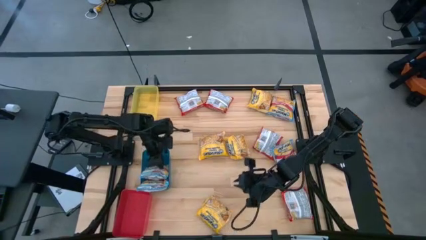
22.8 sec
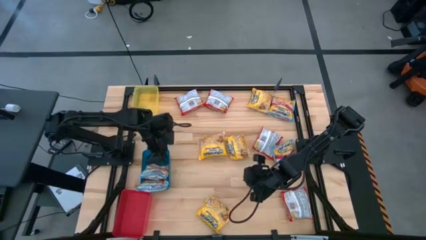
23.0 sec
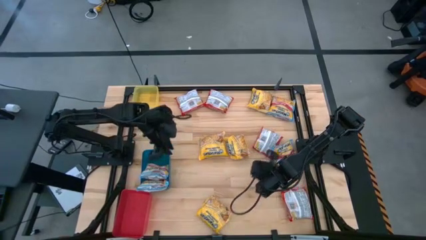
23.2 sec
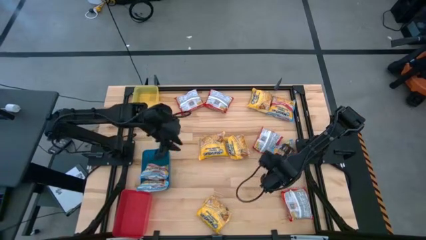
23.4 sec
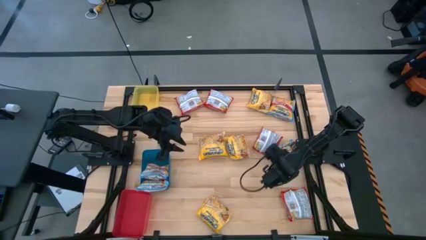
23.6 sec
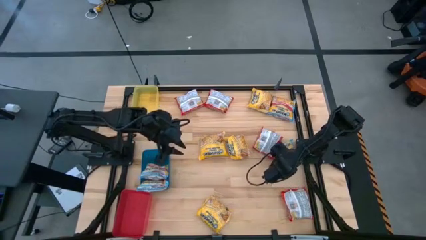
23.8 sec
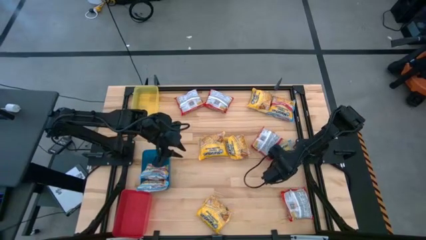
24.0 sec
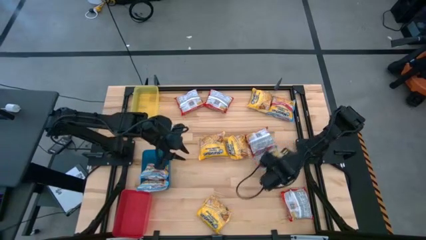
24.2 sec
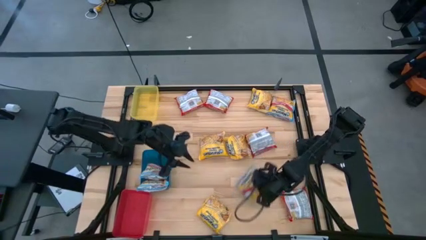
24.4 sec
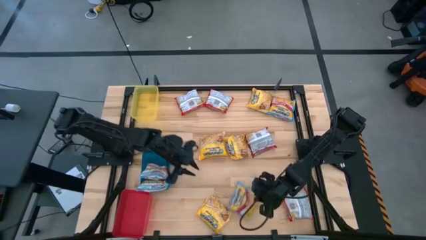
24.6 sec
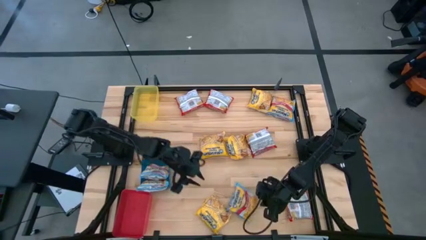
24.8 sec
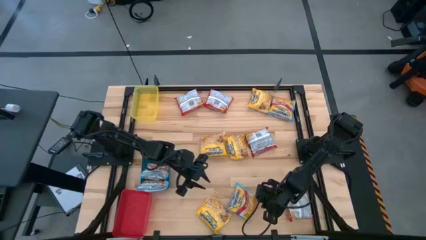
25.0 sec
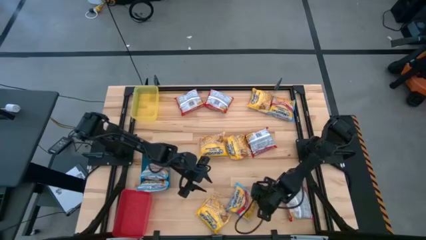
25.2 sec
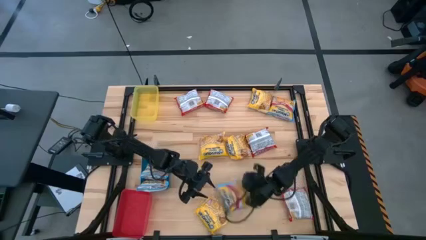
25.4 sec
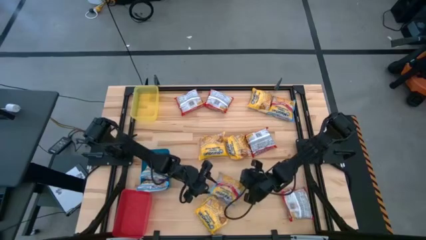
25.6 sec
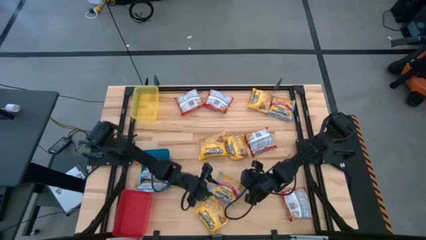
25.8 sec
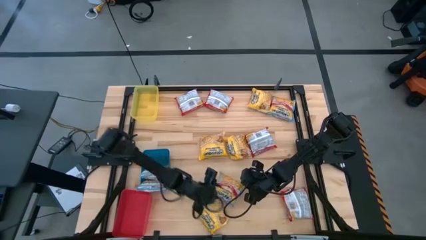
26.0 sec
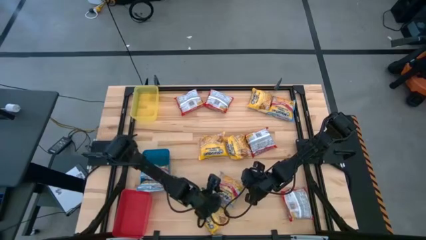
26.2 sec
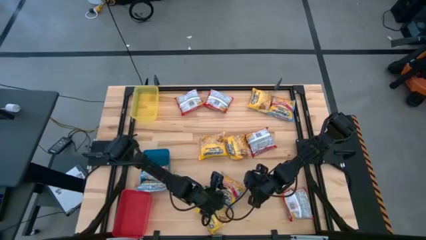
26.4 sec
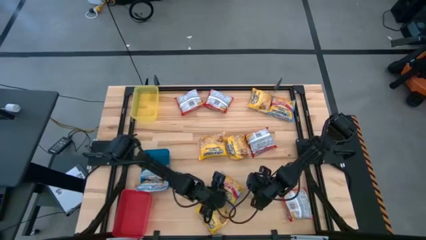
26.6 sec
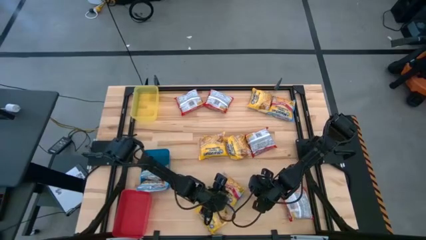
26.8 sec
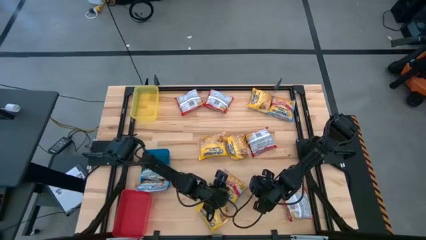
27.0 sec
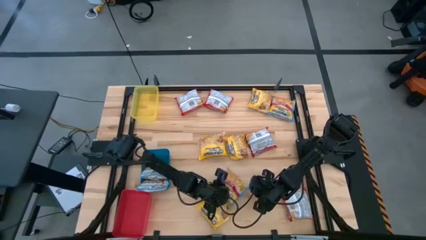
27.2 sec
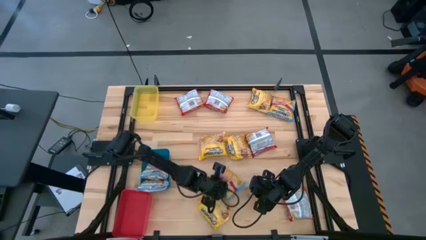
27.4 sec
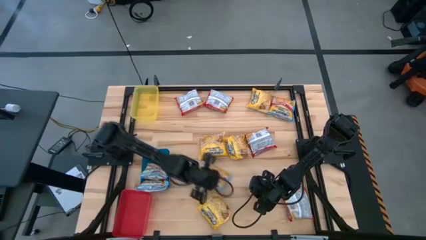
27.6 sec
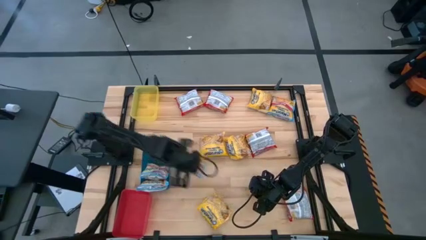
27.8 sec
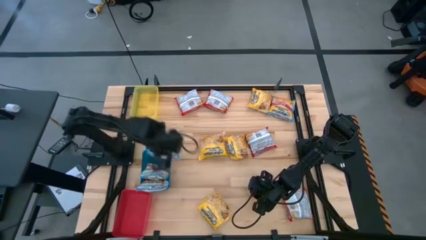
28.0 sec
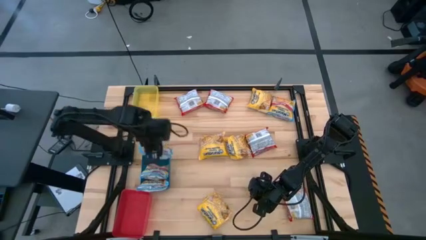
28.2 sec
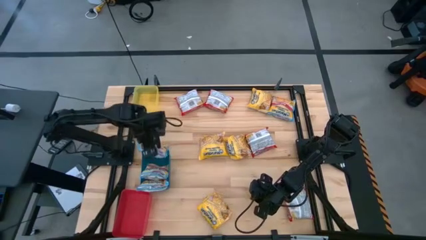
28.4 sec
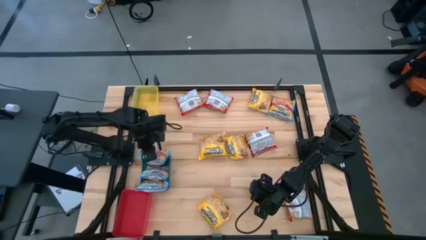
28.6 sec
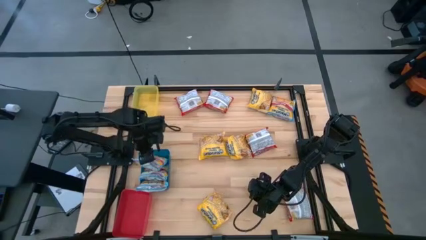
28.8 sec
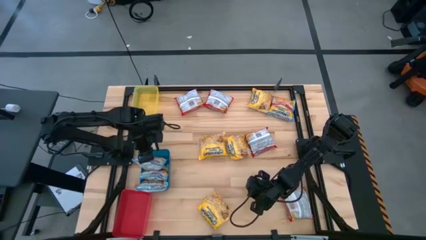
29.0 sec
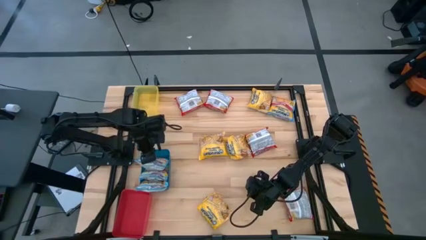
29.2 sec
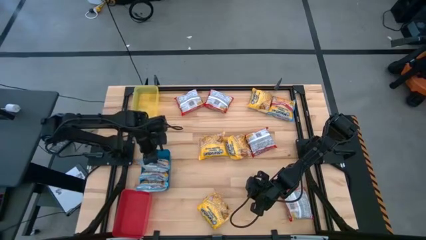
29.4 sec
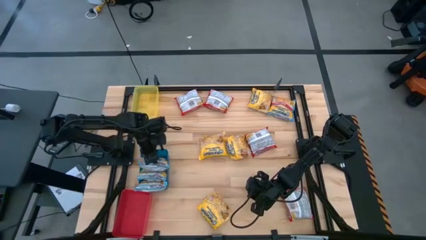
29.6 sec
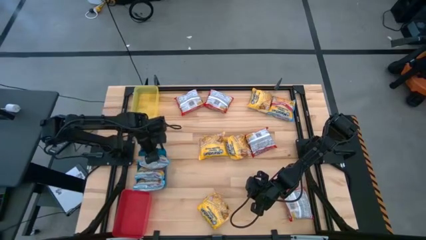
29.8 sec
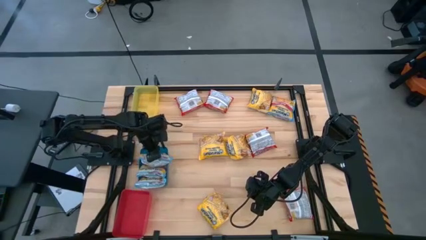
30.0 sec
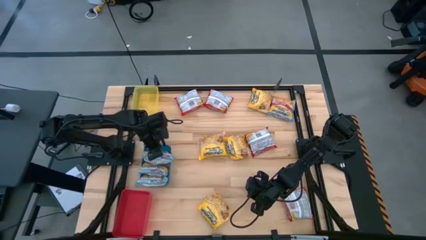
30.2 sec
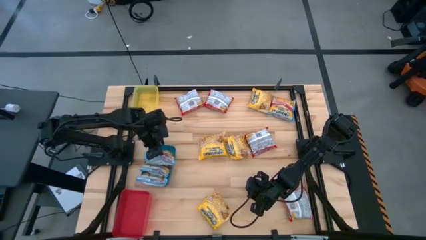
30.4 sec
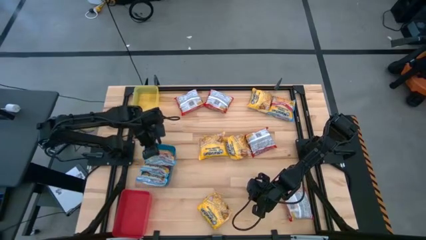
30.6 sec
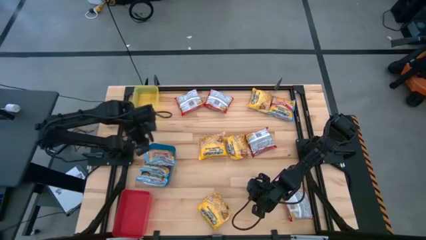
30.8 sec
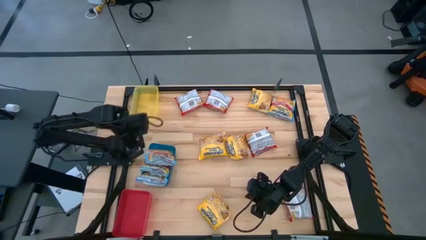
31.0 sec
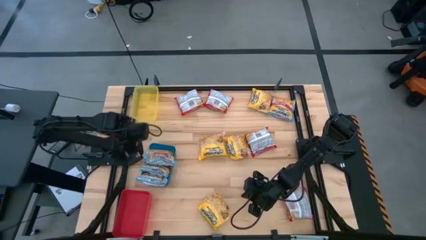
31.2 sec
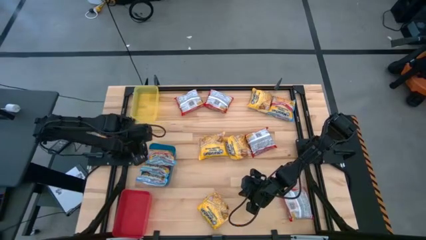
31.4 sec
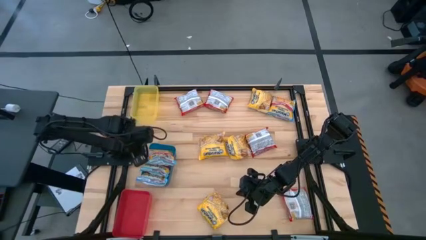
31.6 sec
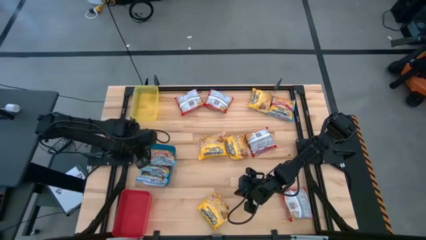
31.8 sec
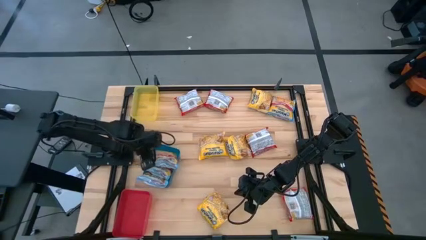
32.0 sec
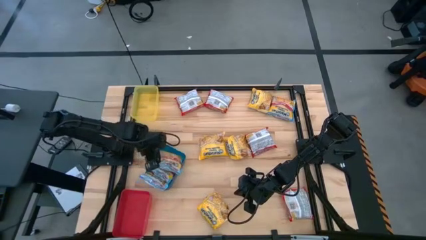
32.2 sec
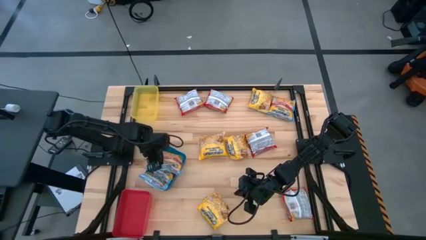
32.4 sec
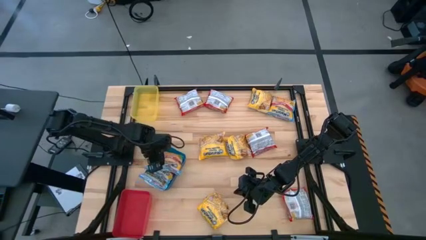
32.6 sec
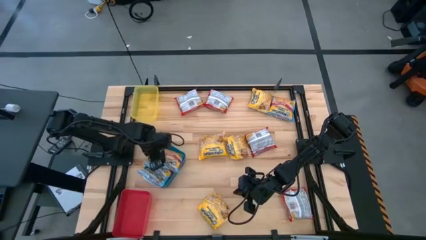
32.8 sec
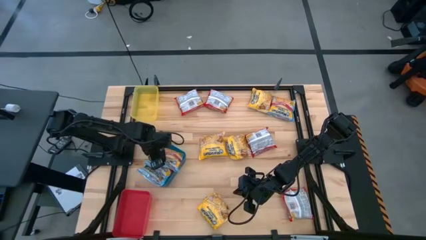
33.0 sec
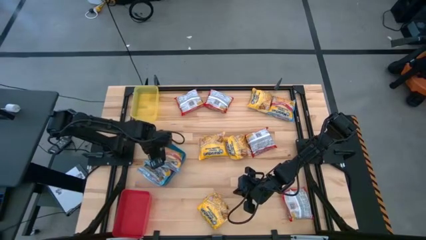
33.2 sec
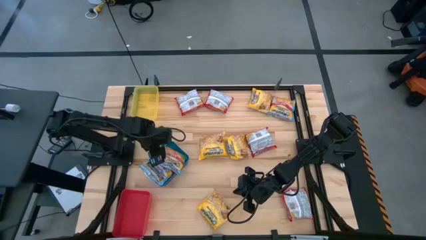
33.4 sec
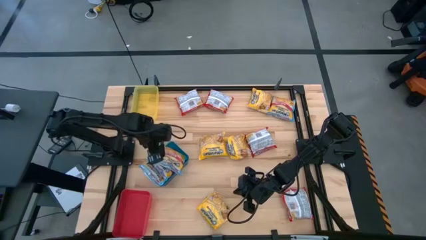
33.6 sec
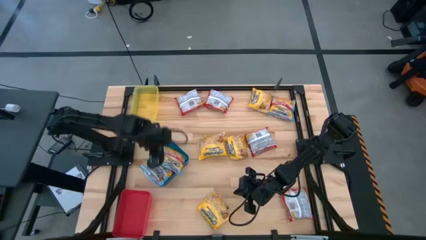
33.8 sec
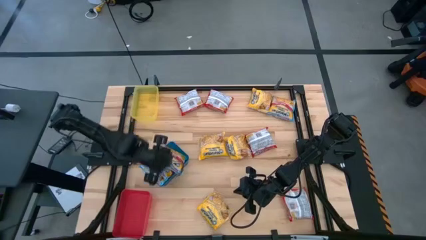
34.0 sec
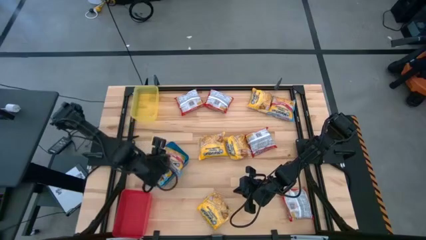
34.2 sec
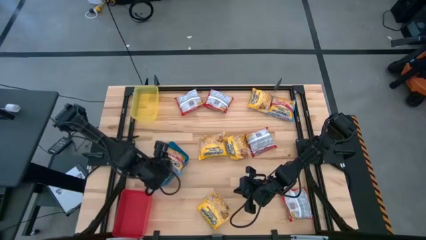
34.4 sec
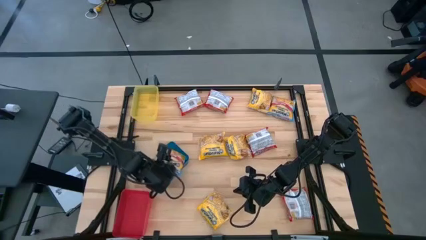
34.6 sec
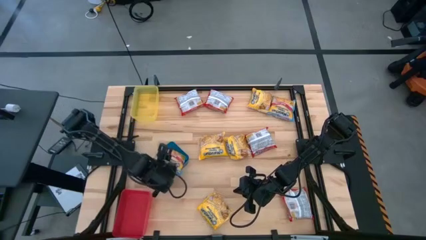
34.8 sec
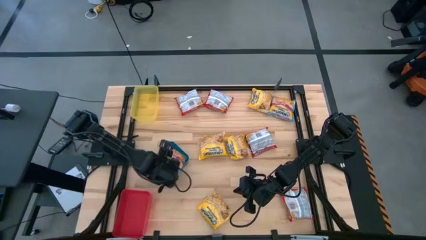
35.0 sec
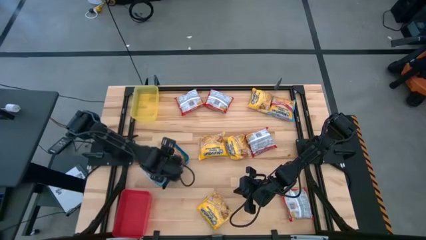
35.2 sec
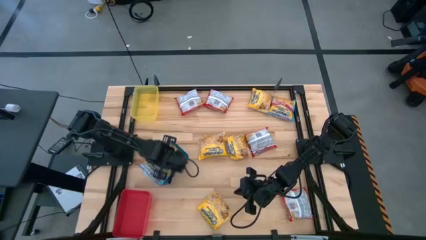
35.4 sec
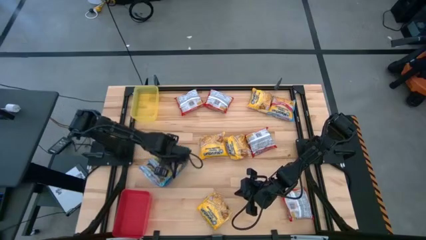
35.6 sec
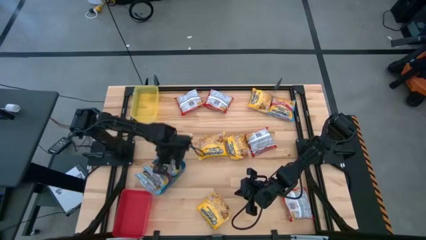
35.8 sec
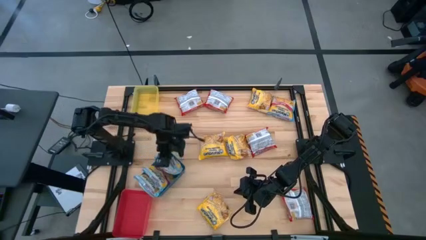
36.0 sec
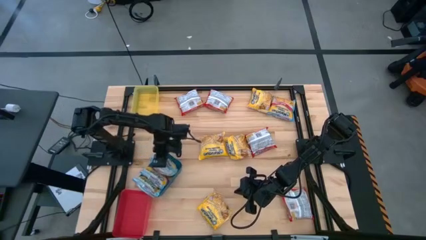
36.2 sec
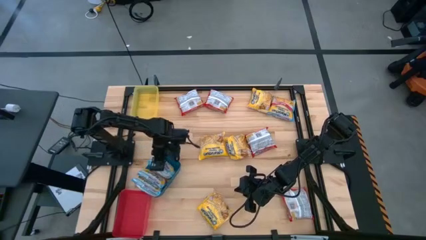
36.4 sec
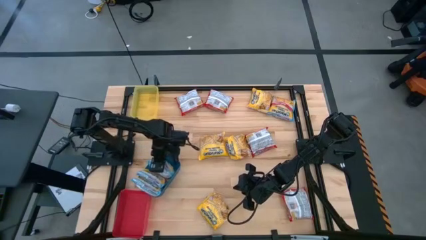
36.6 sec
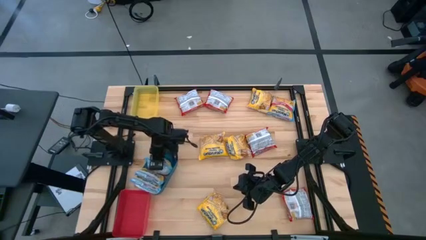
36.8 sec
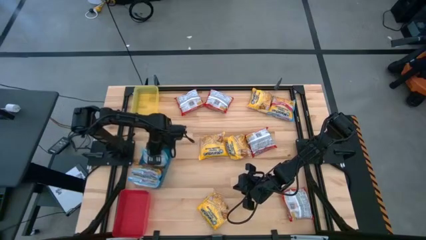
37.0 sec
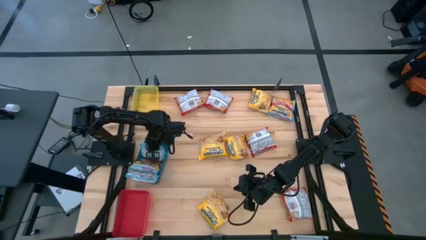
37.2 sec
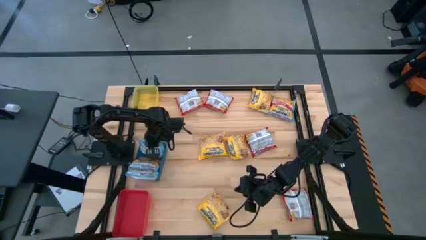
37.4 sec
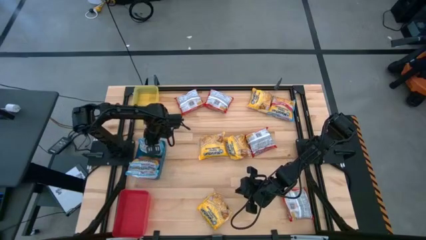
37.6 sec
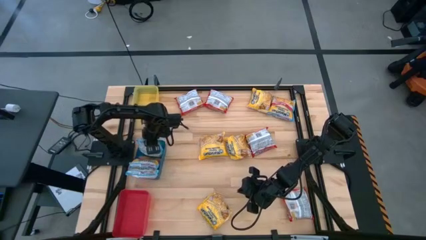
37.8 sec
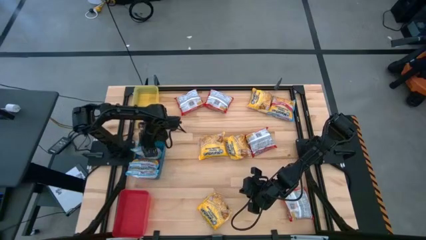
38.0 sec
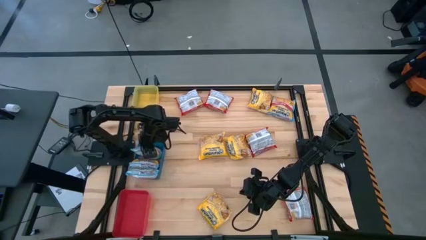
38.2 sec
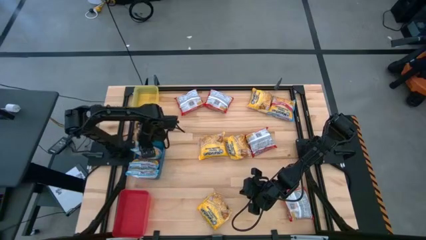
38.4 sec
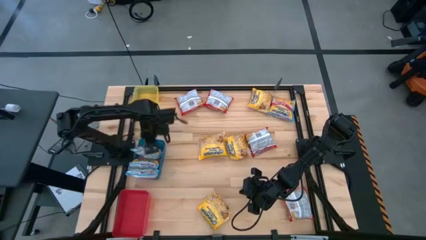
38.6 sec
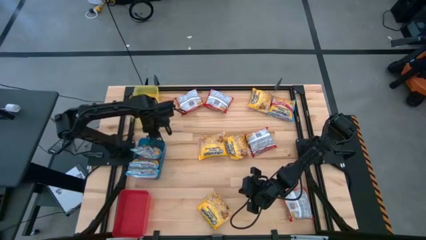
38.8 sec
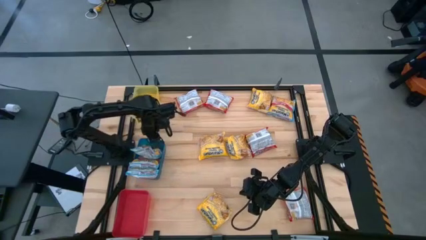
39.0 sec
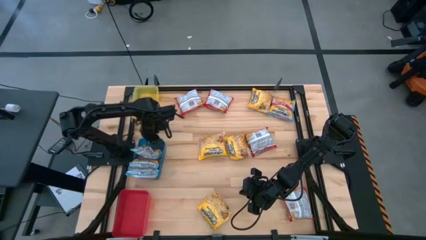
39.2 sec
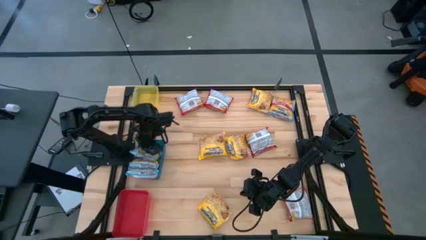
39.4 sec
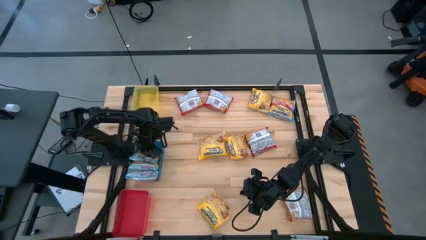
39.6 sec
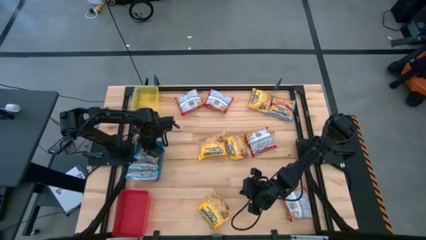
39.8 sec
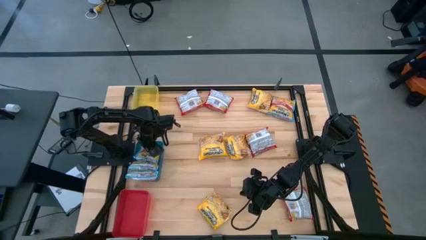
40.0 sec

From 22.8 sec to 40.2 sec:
Task: Sort Maruchan noodles
Put the bottom blue noodle pack into the blue bin
